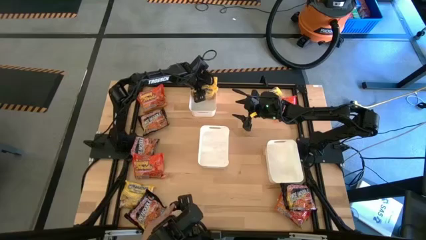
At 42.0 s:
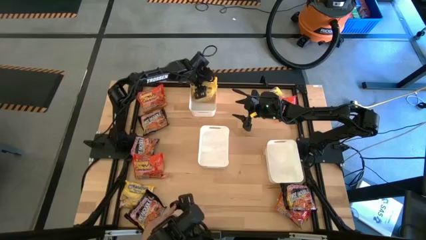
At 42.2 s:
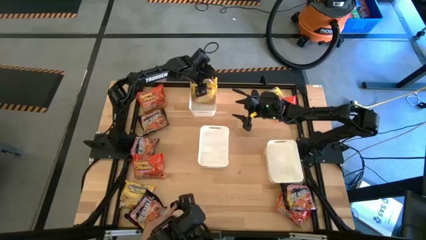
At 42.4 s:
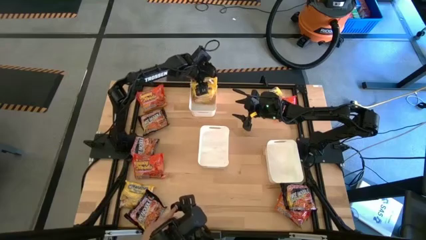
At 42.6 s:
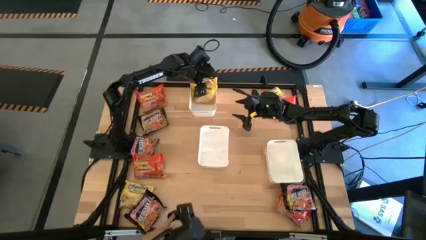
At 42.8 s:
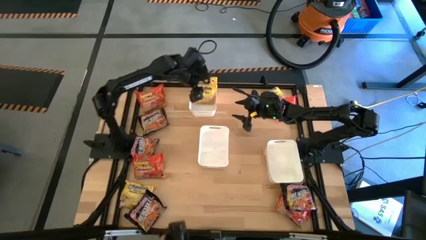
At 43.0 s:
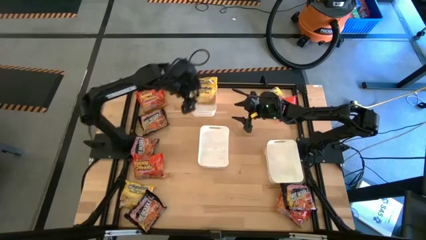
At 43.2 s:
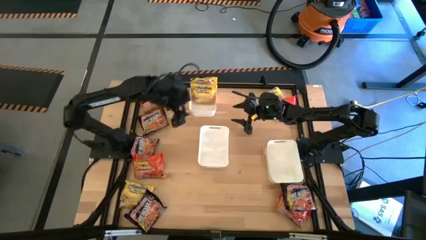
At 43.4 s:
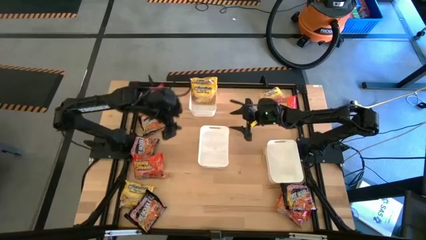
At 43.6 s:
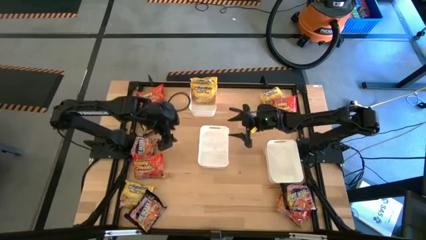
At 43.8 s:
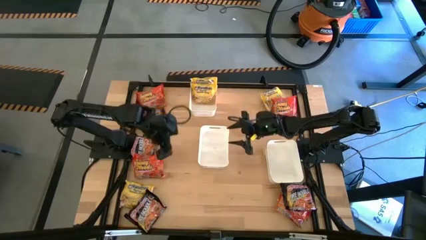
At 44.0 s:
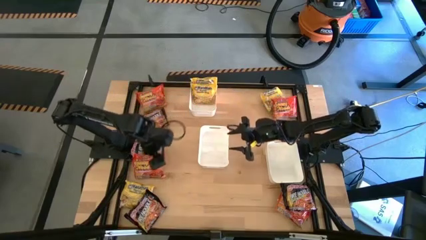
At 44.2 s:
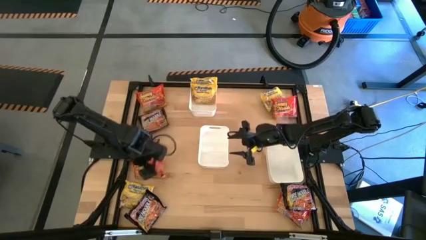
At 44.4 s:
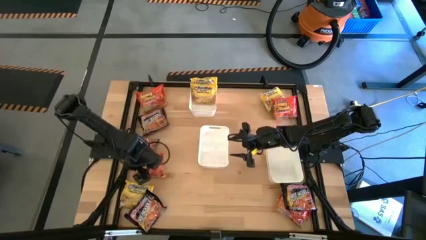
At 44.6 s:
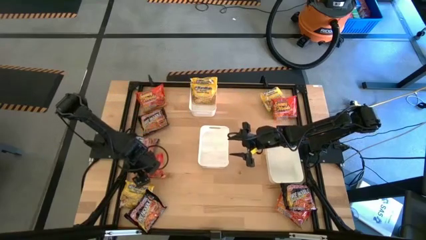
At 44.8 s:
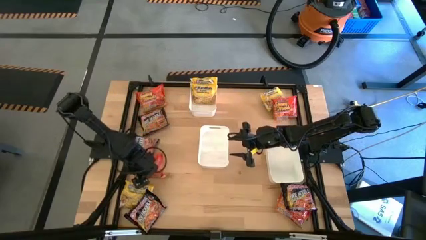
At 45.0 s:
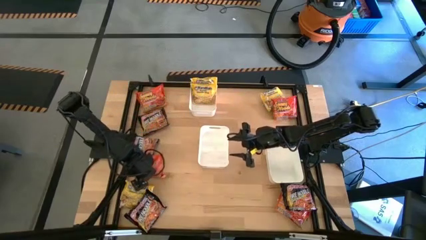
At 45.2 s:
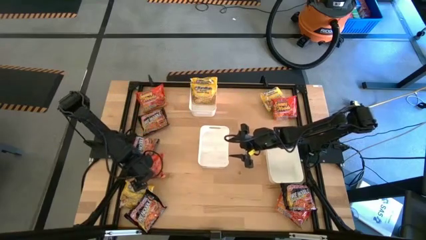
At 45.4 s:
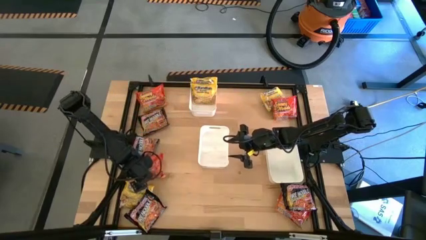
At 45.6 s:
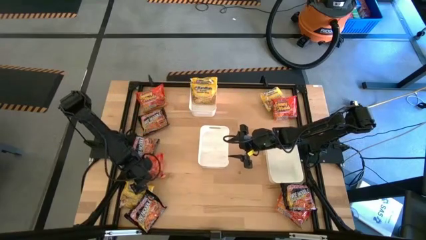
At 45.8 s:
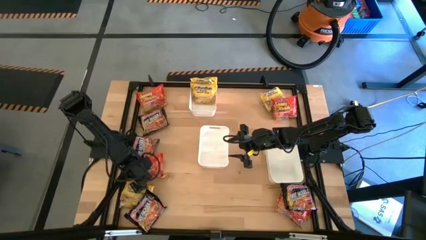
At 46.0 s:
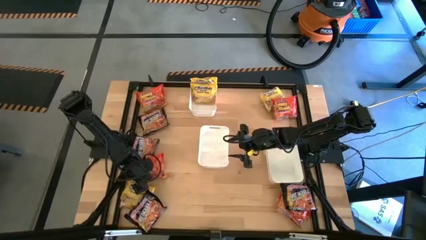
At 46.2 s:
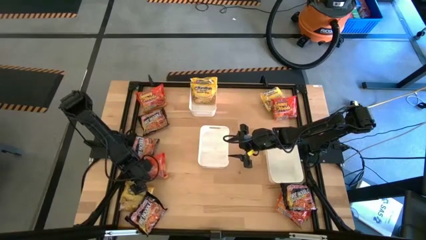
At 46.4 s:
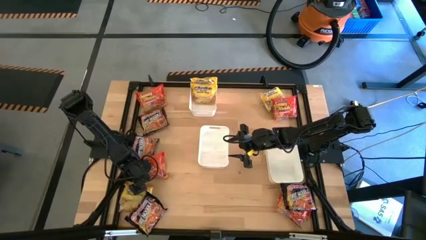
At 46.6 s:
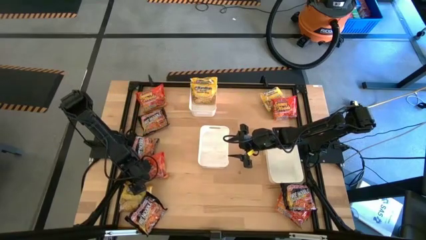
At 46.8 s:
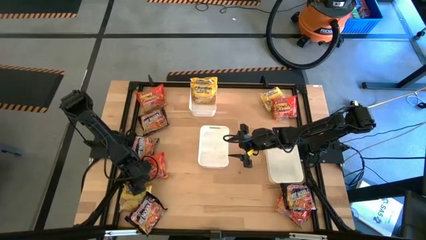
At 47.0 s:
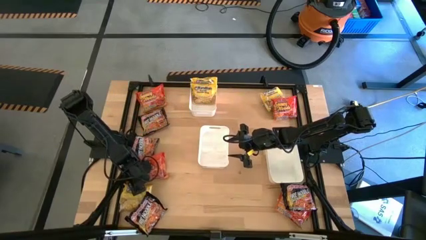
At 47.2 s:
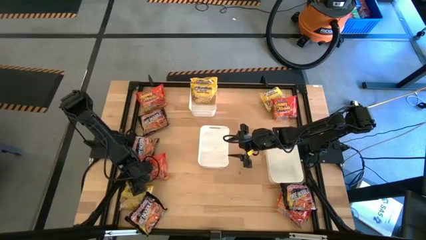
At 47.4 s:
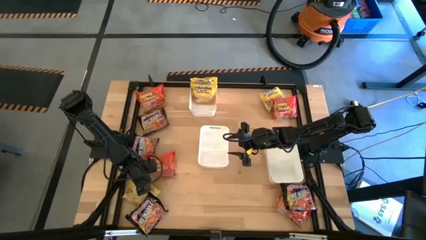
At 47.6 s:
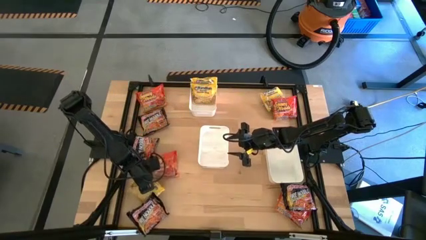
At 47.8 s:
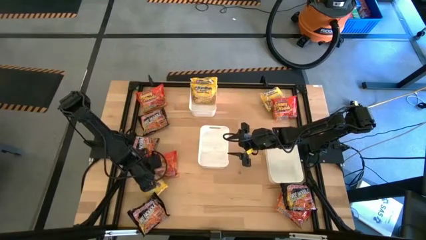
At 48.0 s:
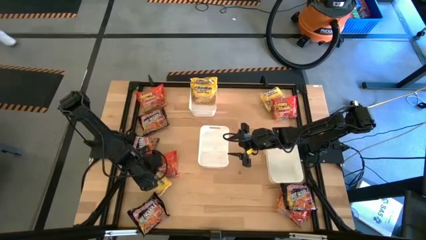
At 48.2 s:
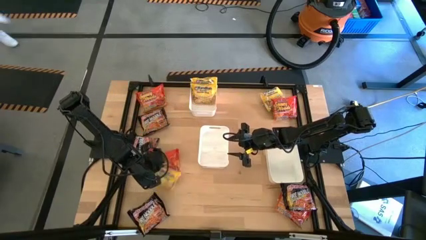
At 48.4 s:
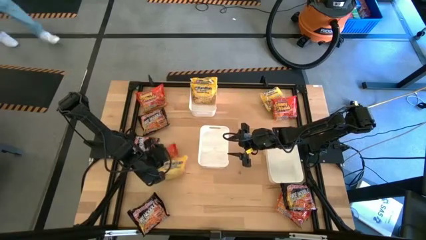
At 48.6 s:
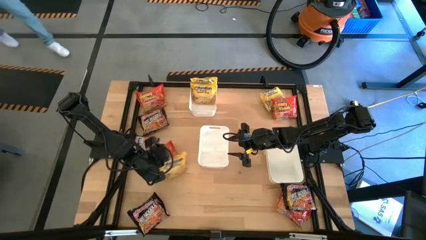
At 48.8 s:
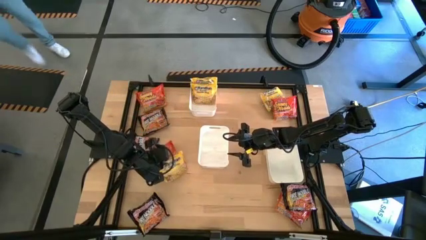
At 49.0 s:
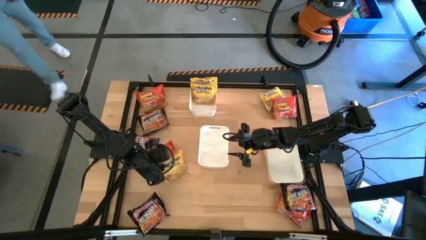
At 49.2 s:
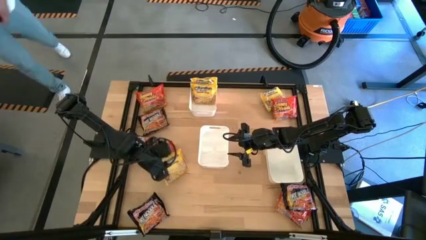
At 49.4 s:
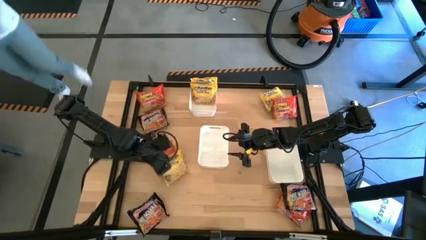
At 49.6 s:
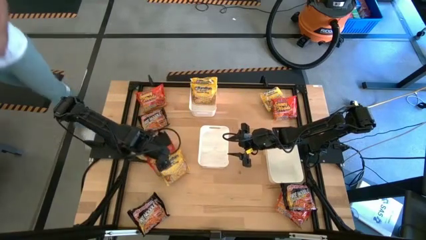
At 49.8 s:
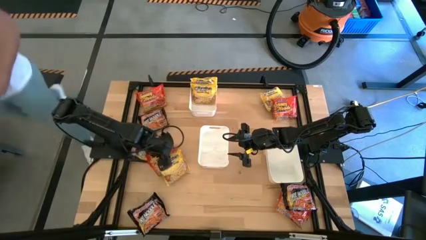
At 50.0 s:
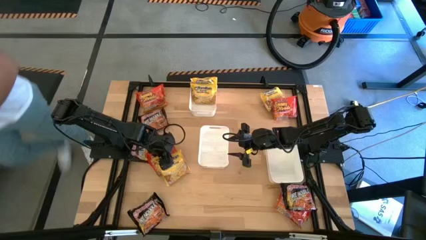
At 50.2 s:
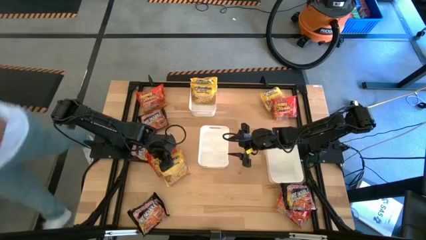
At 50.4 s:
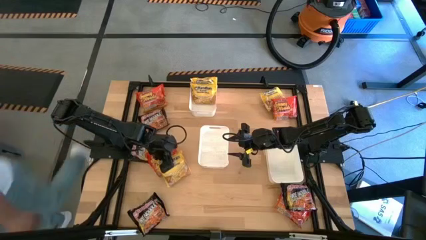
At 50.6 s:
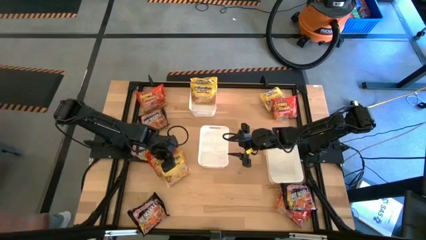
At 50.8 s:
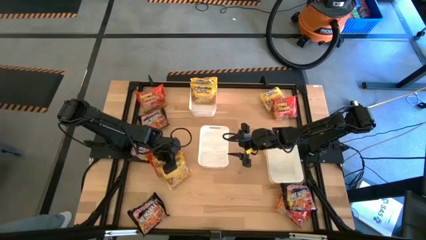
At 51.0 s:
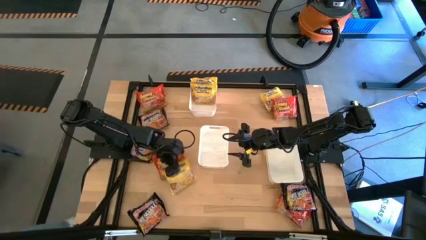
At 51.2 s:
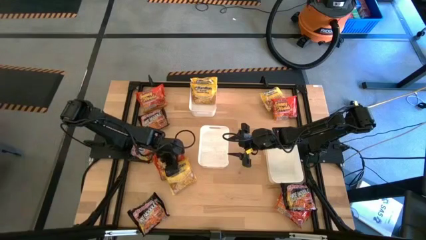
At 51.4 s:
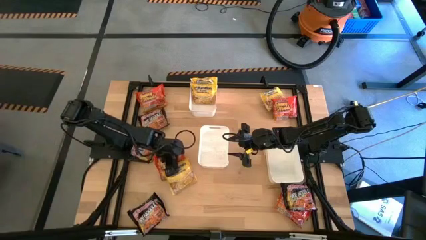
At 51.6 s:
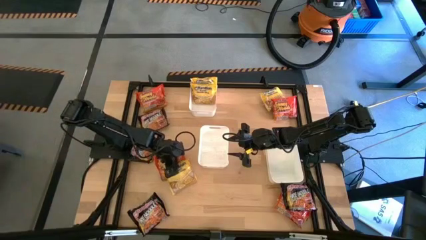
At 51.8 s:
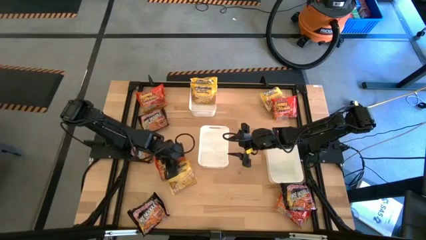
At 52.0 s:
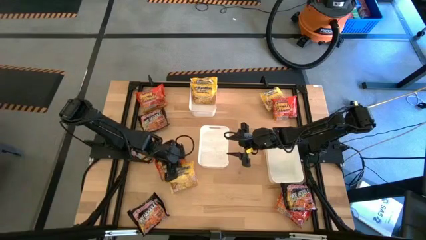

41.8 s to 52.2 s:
Task: Sort Maruchan noodles
Put the yellow noodle pack into the top white bin
